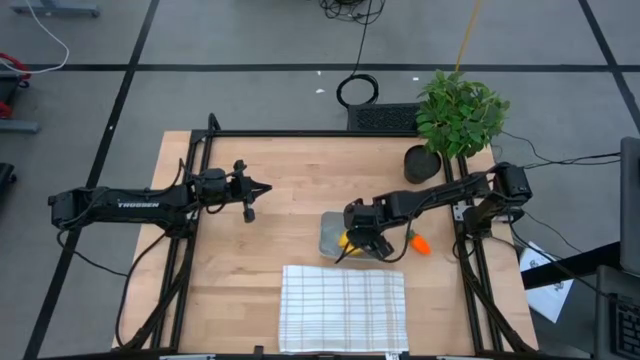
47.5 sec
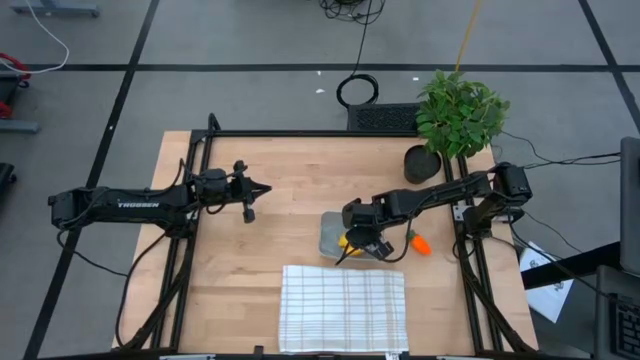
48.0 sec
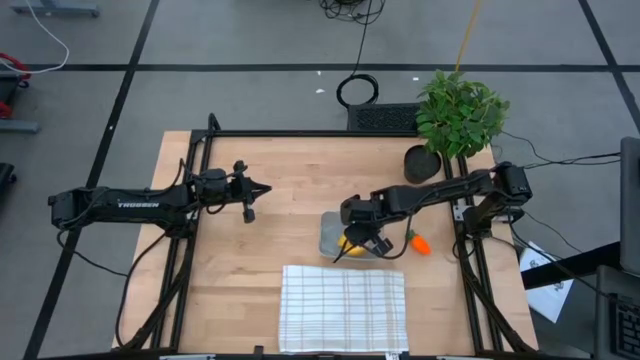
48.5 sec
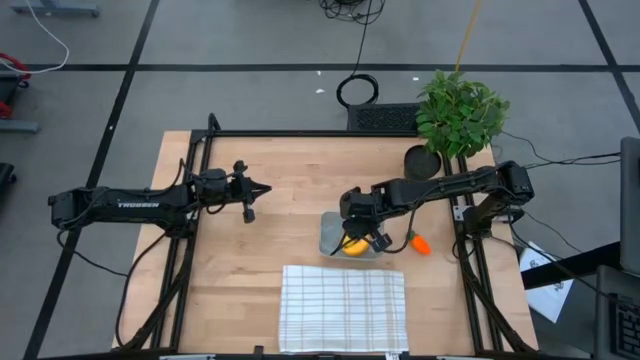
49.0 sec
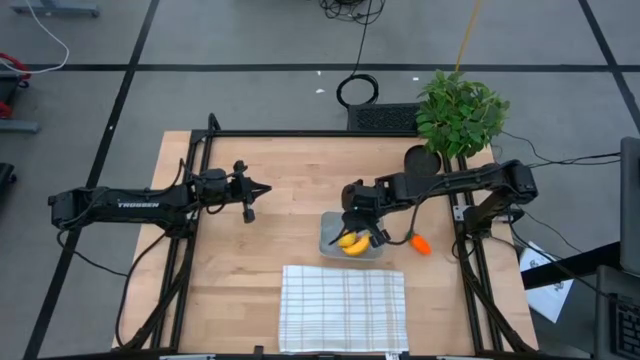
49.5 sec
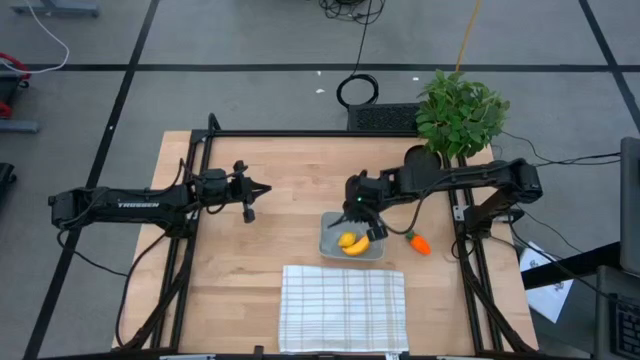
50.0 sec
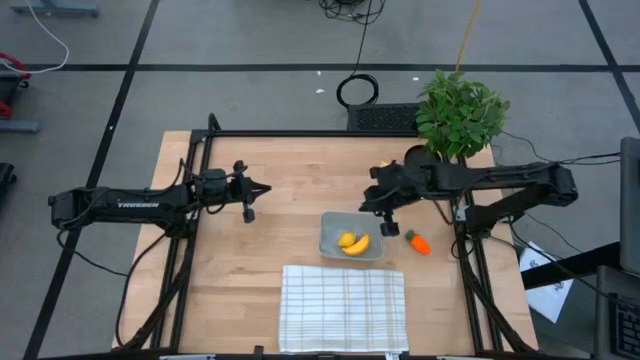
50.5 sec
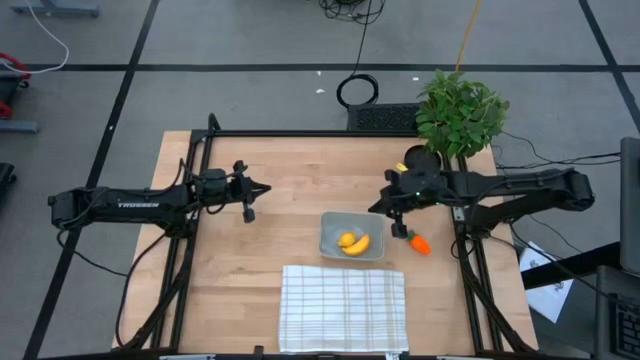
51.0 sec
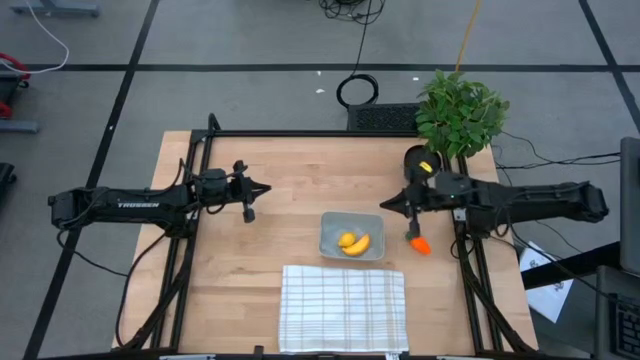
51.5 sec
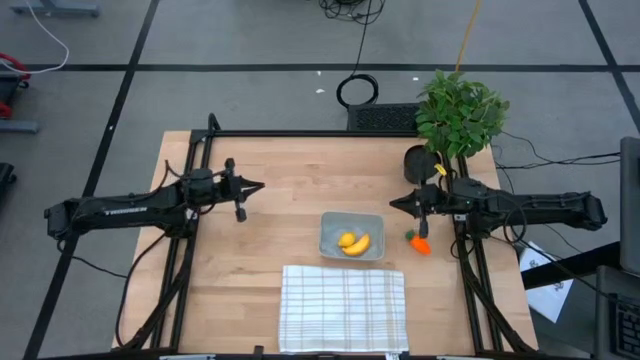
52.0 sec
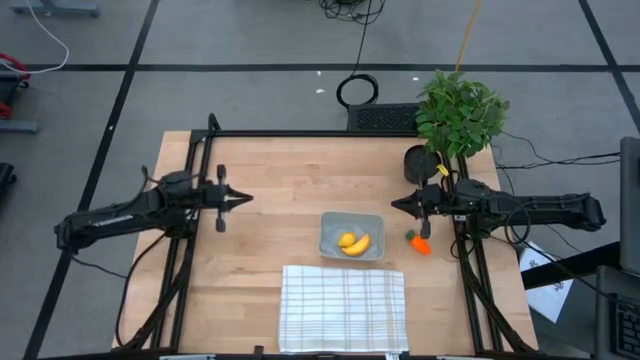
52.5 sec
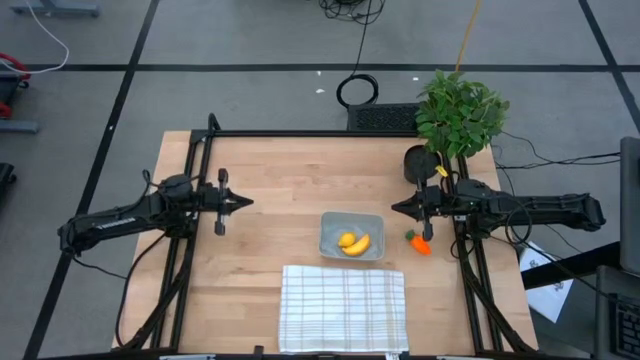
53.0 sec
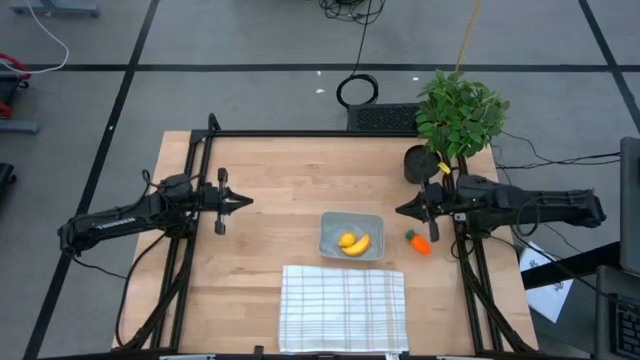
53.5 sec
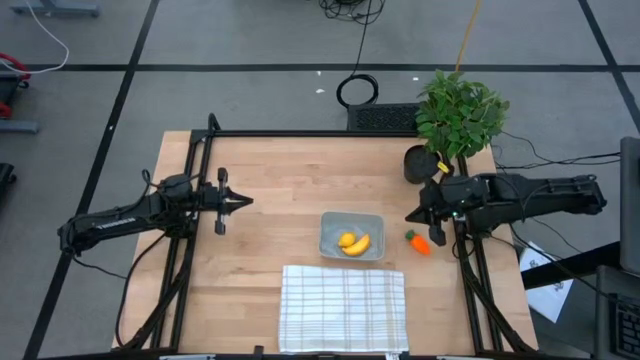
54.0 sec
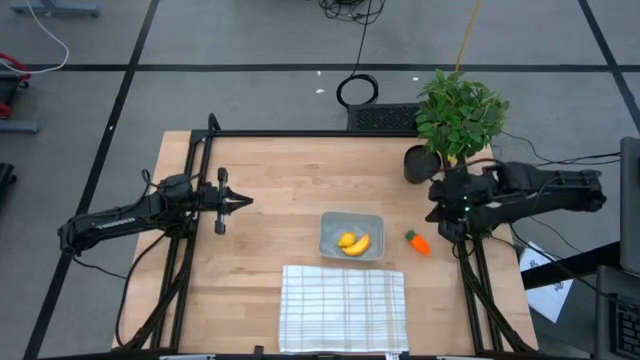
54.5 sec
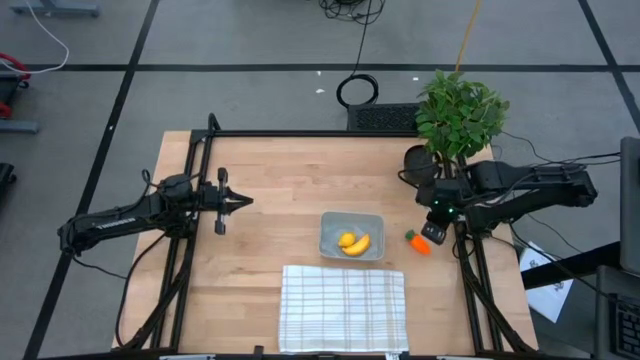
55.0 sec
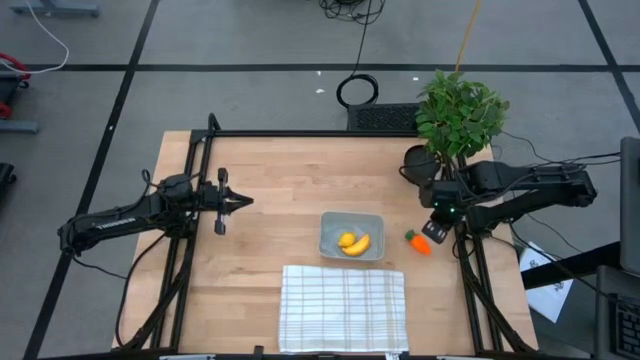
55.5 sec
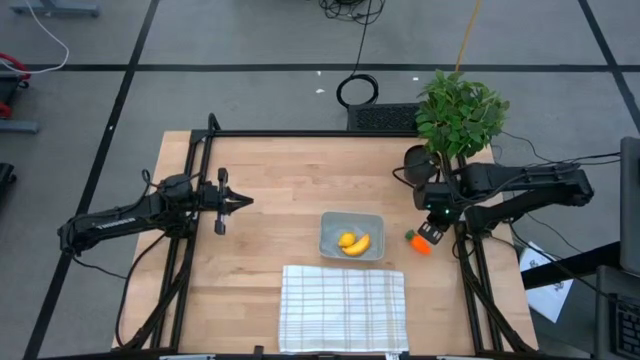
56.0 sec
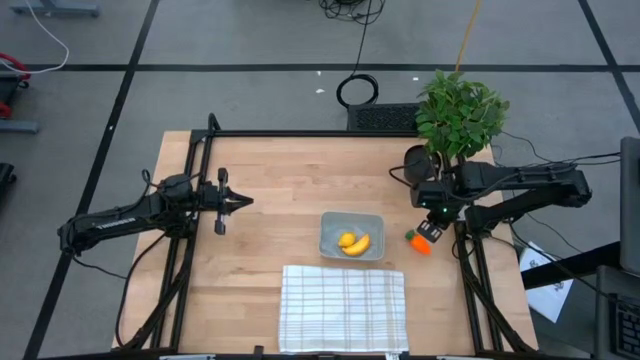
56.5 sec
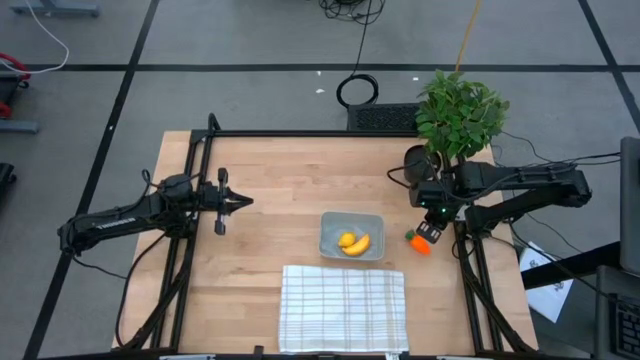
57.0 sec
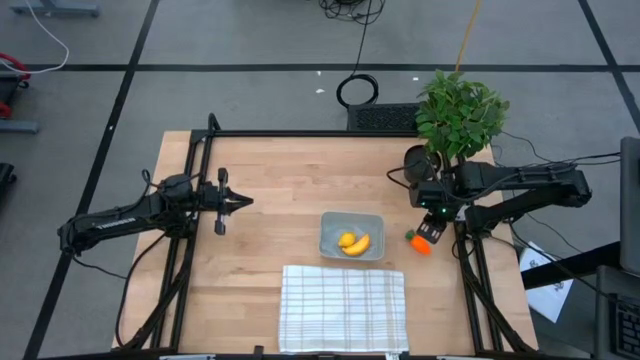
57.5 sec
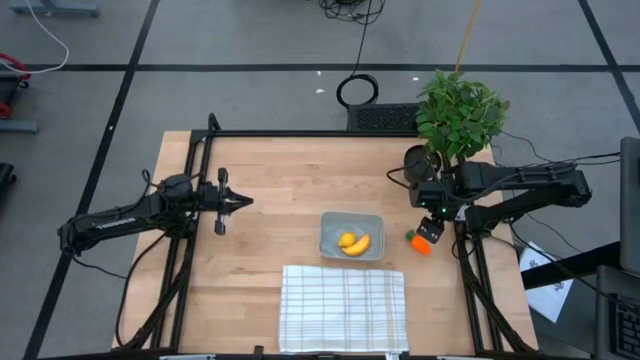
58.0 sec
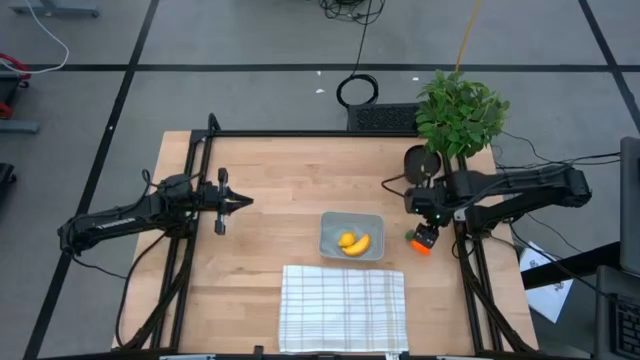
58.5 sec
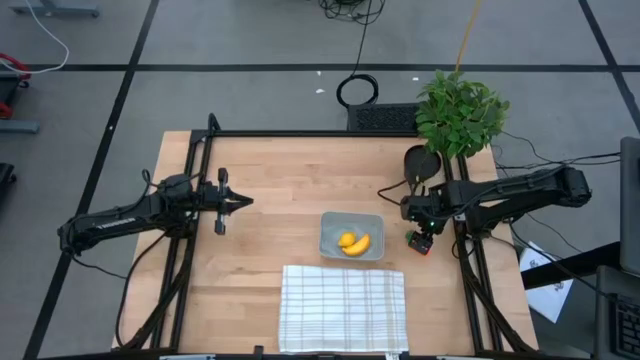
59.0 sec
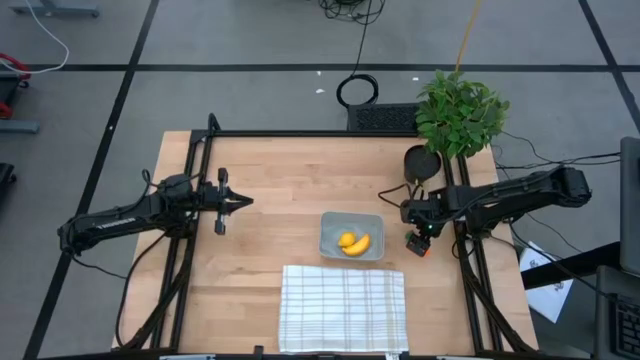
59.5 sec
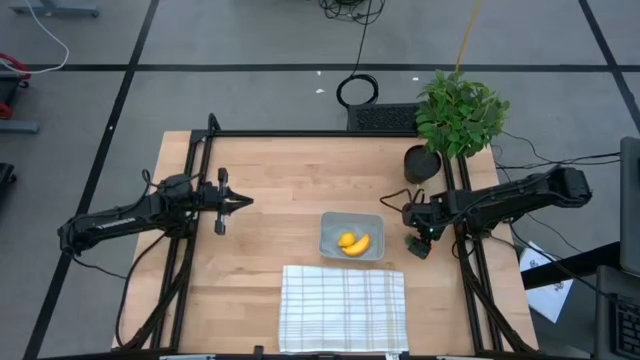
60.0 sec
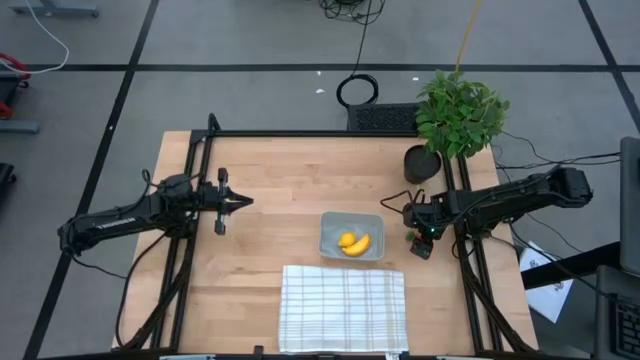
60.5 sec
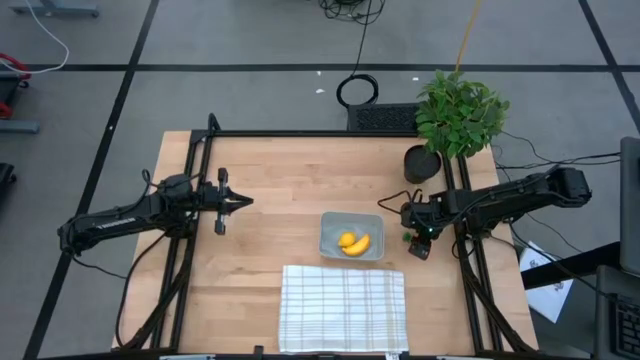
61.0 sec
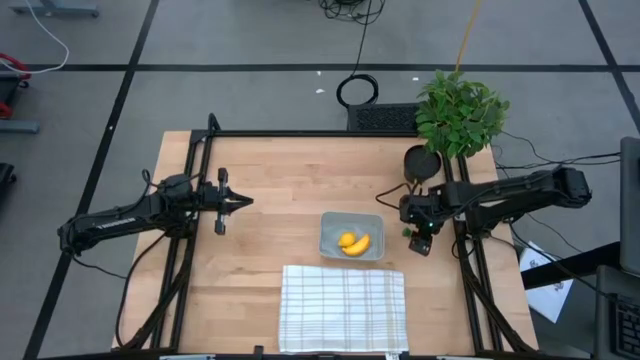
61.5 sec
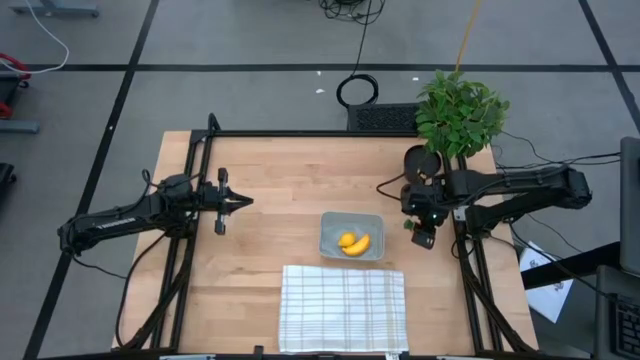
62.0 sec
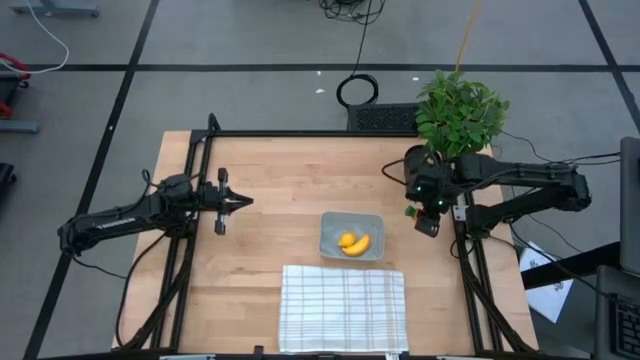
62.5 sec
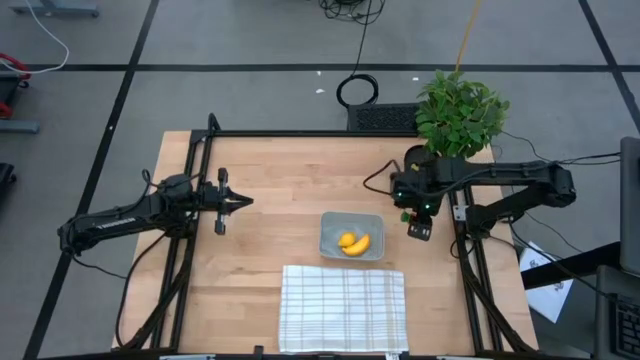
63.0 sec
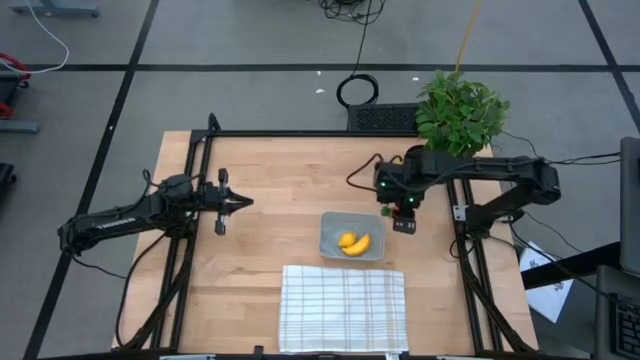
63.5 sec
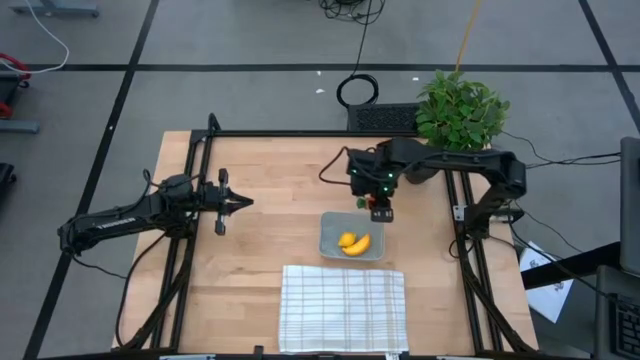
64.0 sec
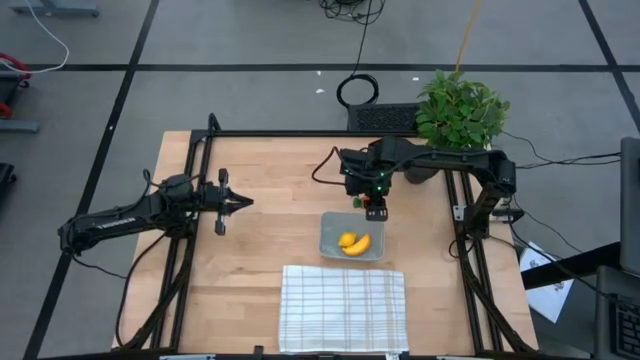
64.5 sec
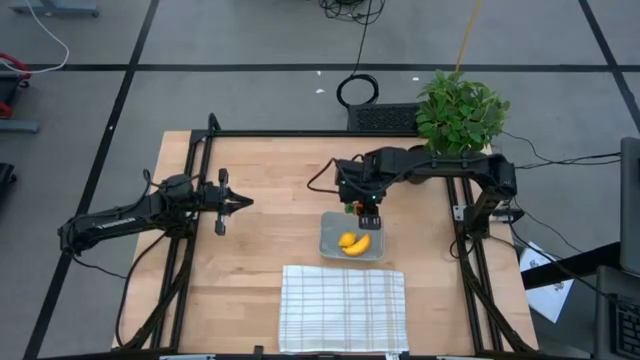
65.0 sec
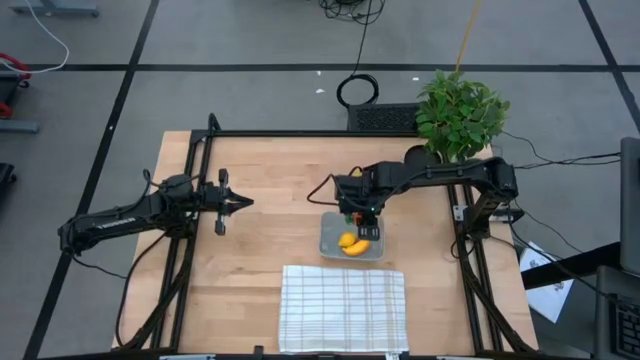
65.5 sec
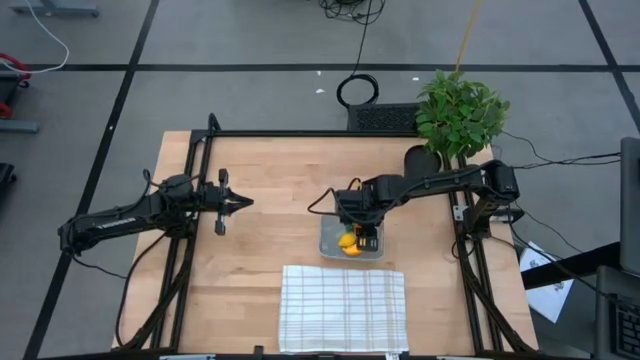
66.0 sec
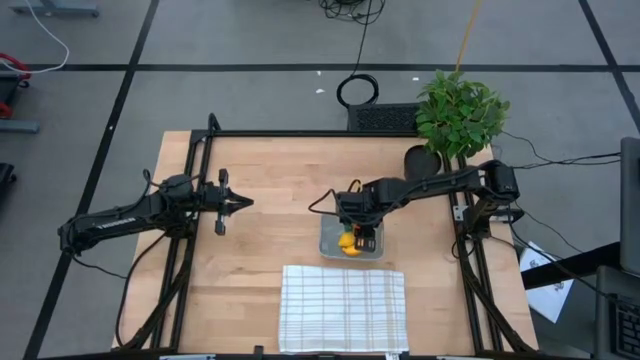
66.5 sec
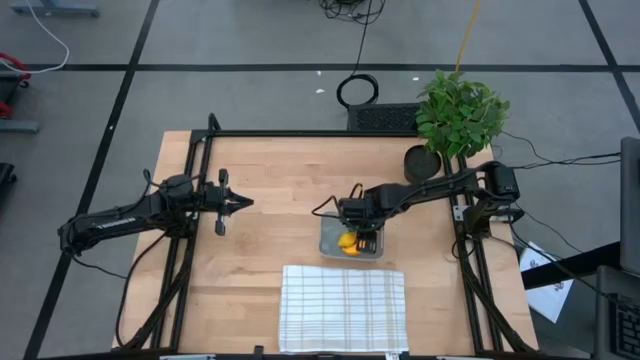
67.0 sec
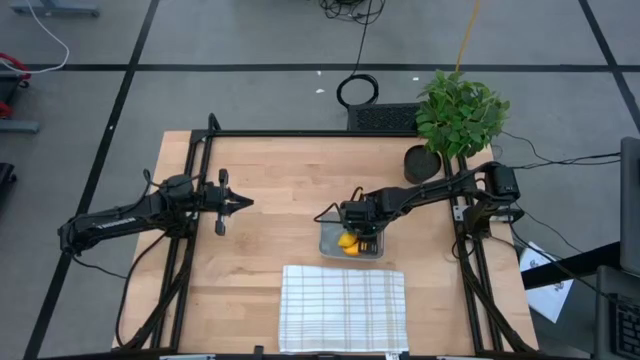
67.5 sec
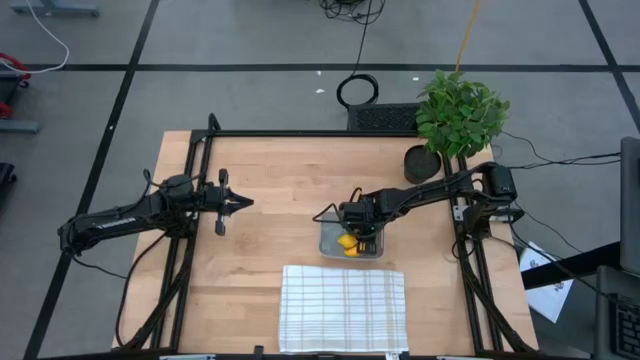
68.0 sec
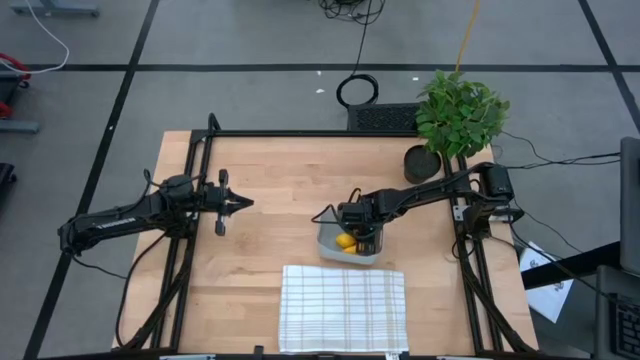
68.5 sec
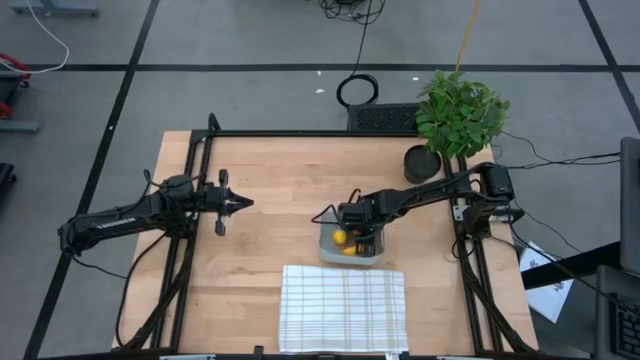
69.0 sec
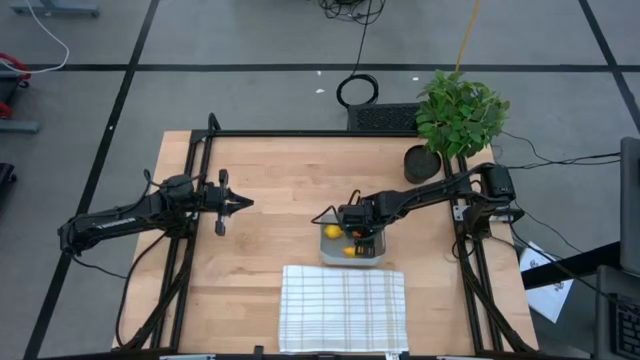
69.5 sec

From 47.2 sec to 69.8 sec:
Task: Pick and placing Produce into tupperware
Put the orange carrot into the gray bin
